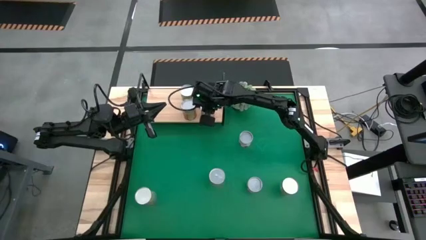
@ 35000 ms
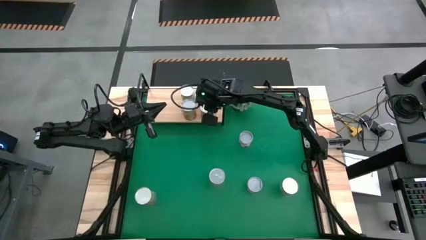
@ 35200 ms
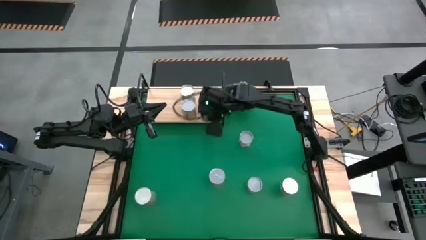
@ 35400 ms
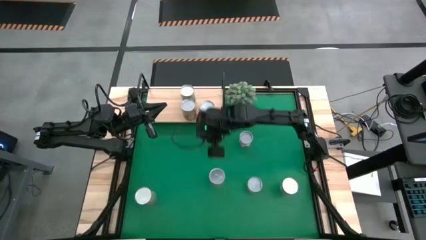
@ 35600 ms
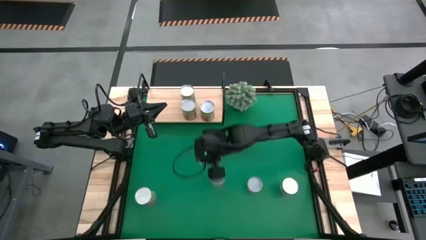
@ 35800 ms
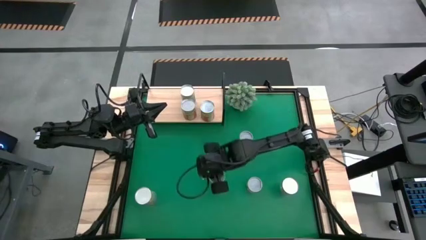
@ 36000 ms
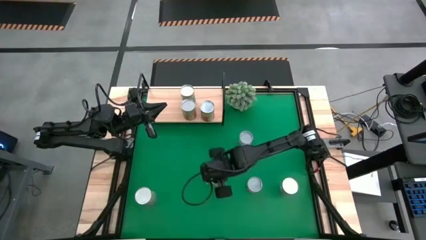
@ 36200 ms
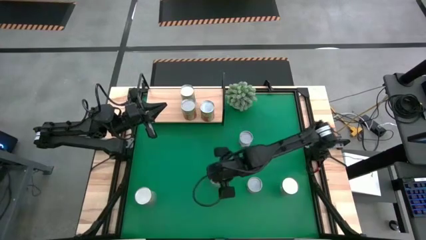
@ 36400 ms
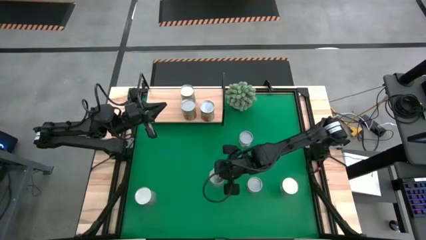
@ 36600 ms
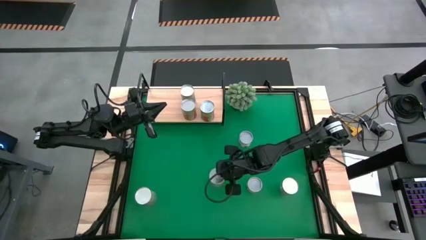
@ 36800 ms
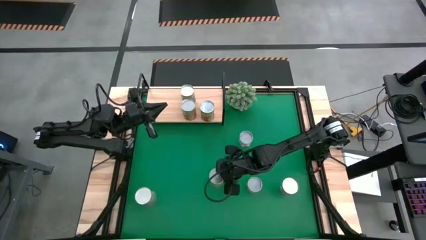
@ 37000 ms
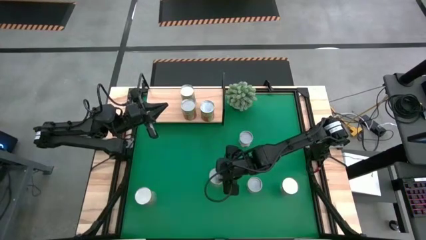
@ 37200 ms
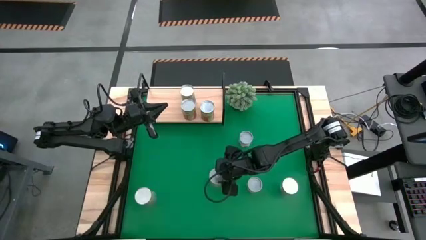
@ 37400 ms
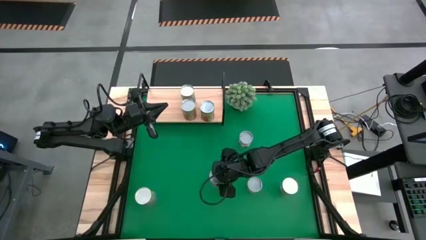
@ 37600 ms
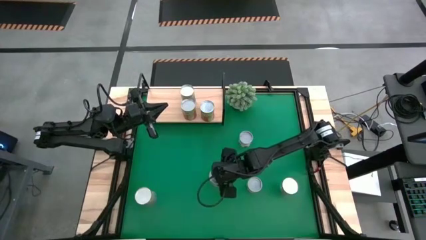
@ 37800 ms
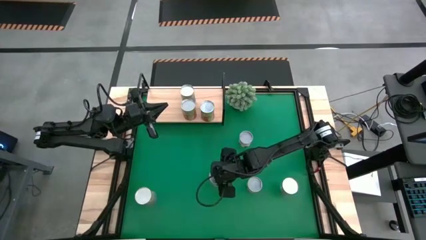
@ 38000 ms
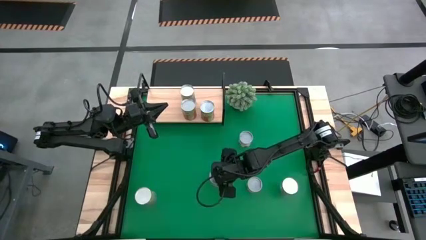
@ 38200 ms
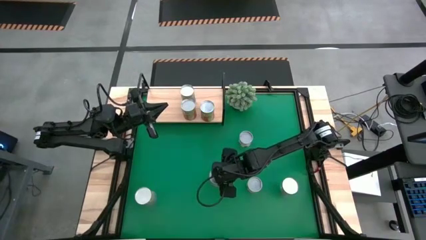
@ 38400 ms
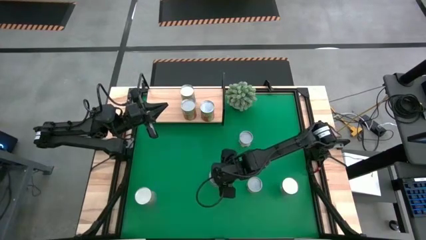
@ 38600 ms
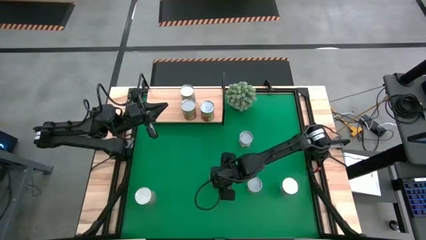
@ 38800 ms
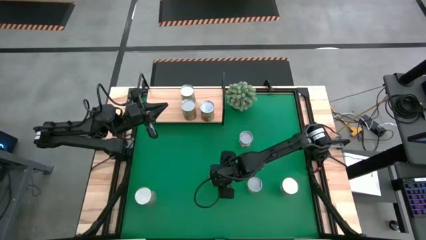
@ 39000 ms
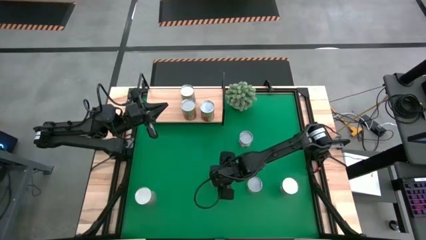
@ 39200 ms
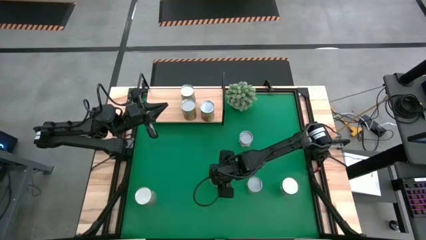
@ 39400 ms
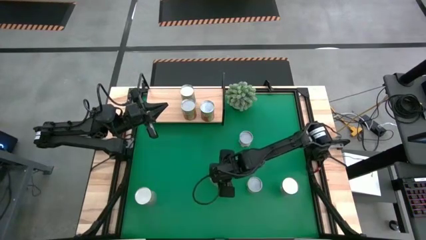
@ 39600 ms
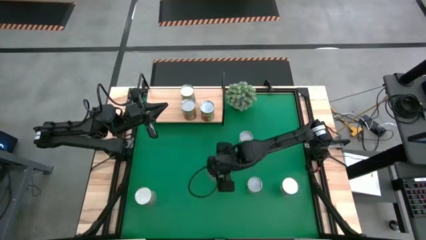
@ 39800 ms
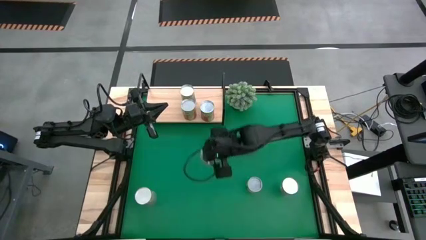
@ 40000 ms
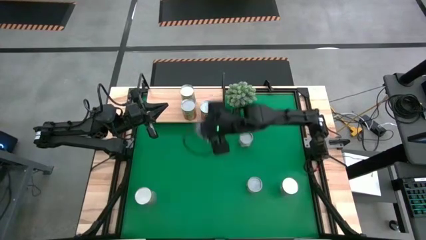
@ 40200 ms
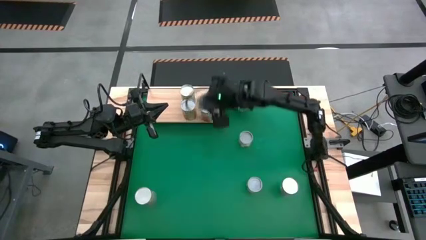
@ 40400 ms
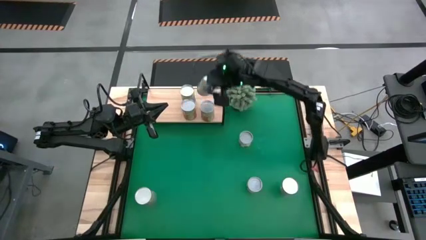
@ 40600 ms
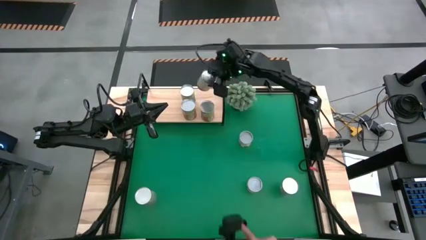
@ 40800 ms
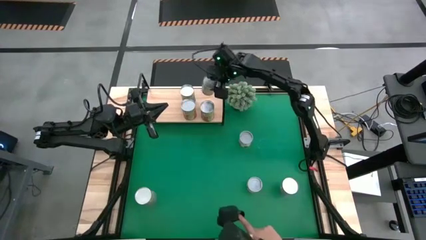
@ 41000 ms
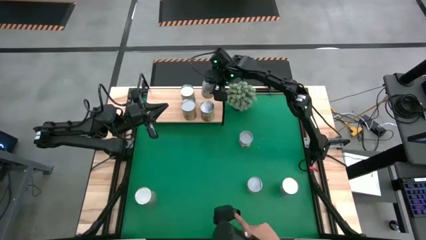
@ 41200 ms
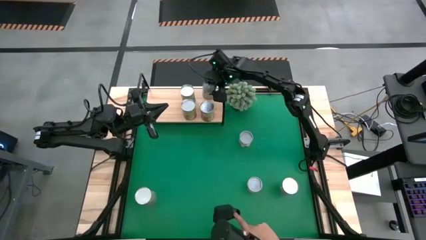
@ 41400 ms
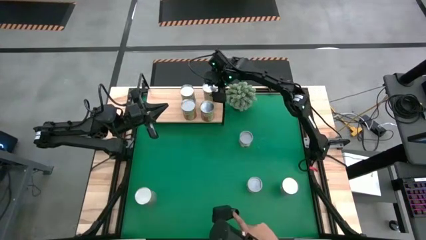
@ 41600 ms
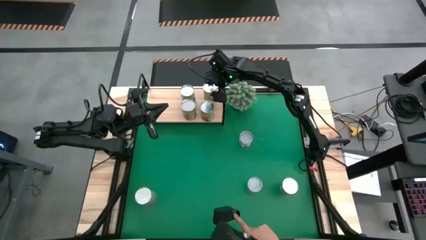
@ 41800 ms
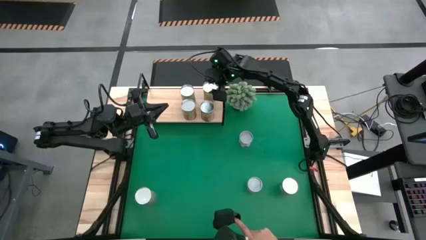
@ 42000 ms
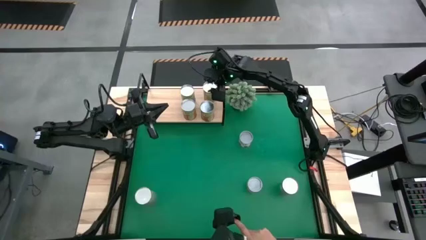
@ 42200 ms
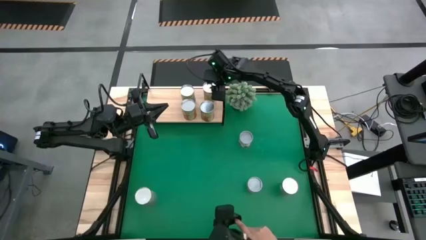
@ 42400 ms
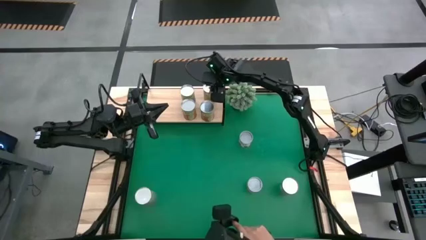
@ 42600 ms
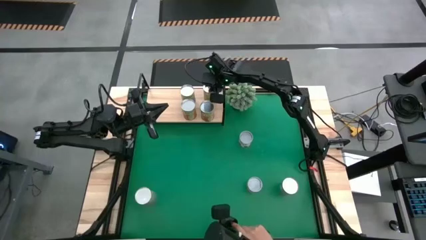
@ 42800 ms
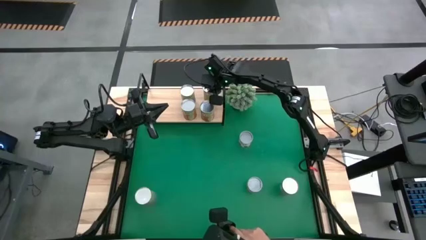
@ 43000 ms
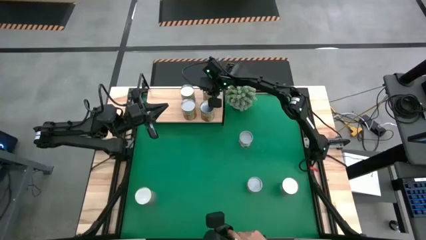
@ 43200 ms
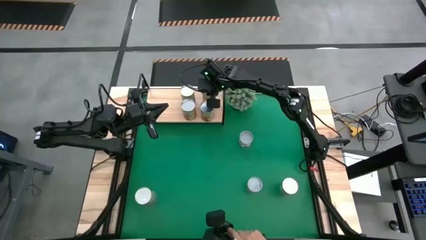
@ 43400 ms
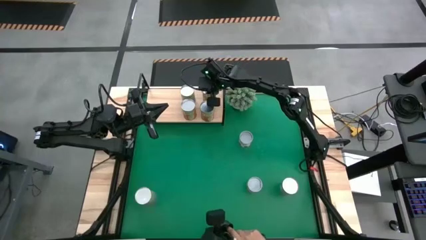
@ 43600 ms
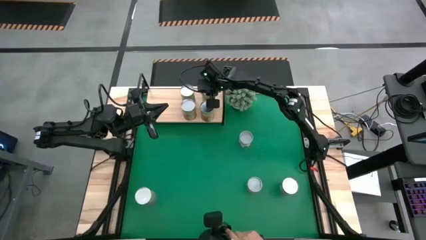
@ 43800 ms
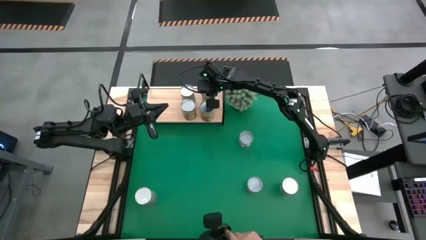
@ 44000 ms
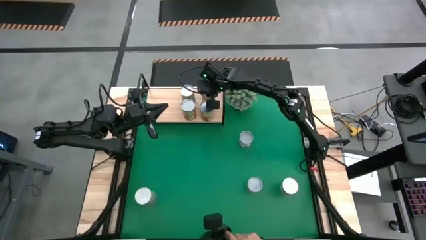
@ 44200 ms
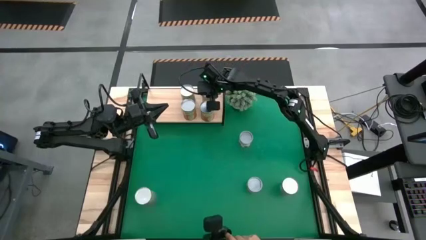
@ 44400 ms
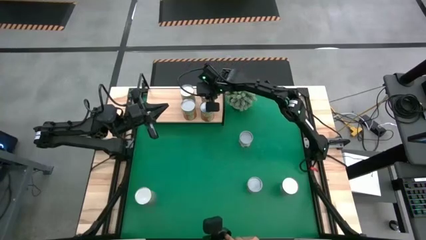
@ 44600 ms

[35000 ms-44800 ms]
Task: Pick and place cans onto a shelf
Put the canned oranges on the shelf

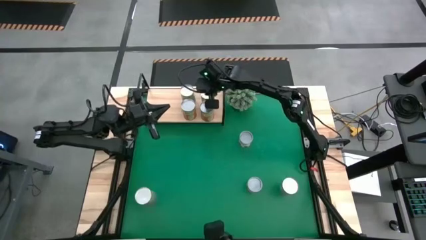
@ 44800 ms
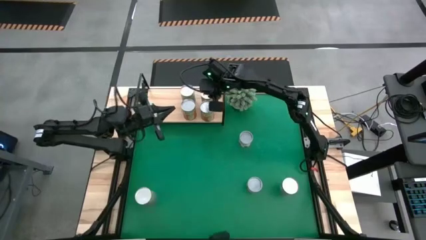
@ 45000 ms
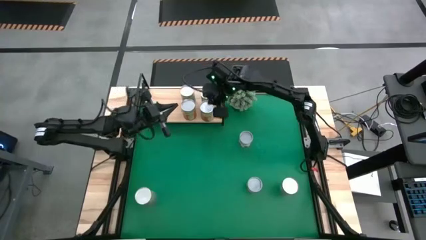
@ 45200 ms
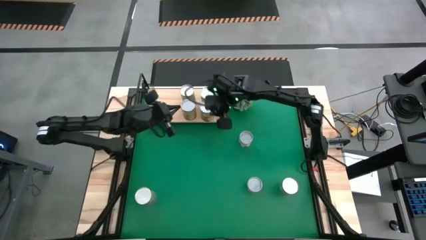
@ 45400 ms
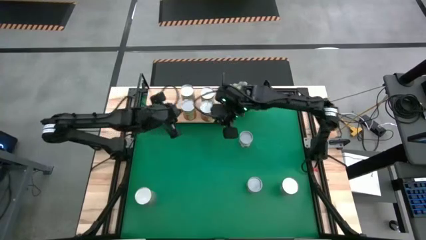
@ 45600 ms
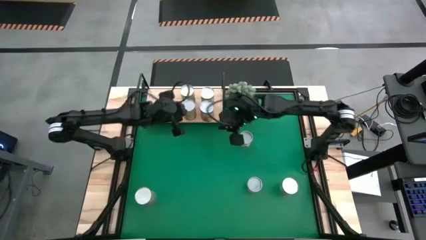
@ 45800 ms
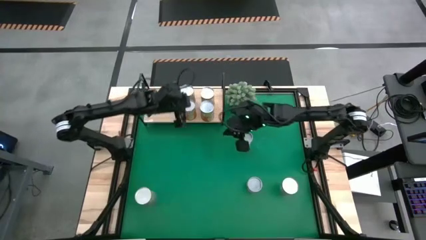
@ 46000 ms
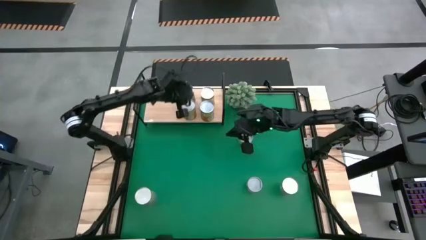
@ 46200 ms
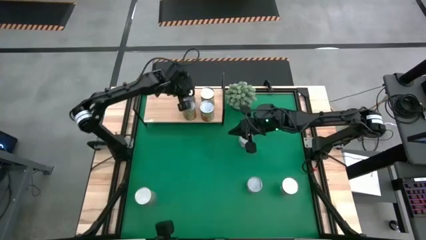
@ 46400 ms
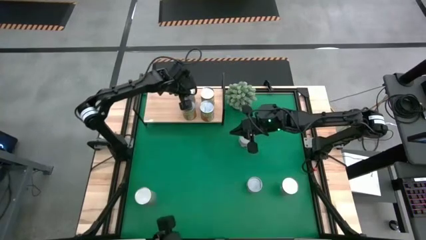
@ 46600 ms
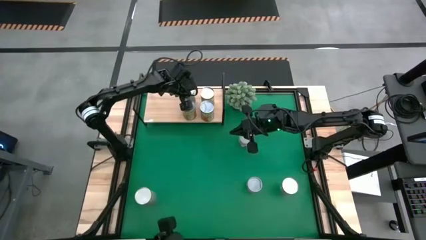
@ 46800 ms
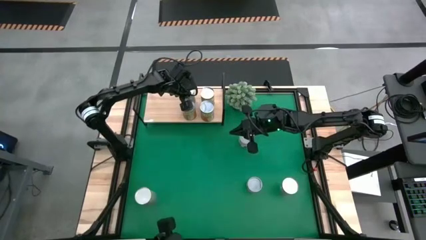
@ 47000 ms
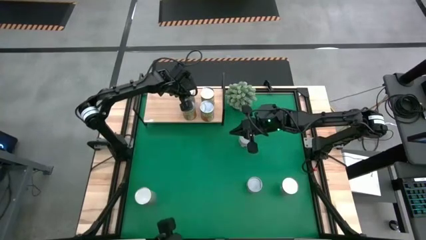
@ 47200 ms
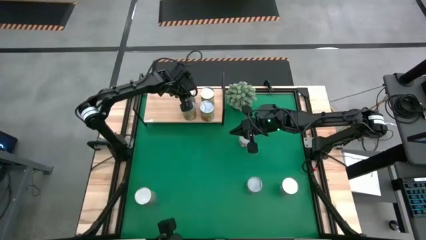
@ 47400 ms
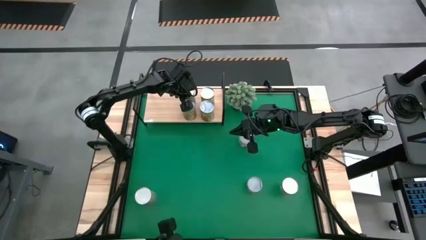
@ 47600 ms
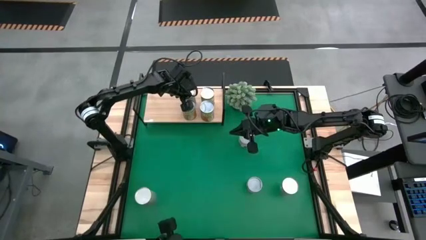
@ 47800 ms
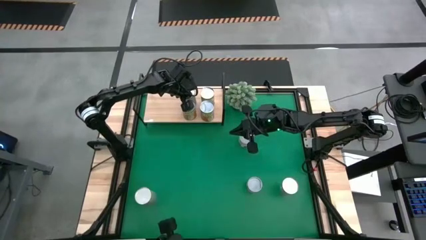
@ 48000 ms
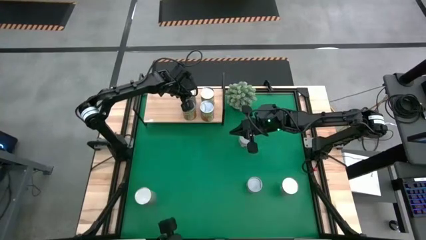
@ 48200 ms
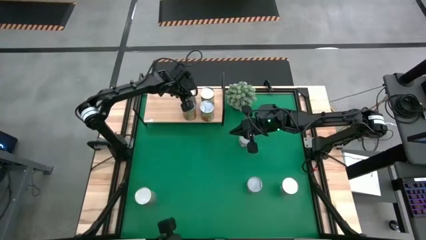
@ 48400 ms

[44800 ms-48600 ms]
Adjust the canned cherries on the shelf
